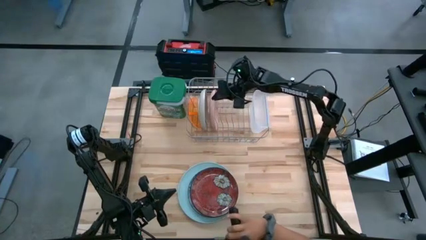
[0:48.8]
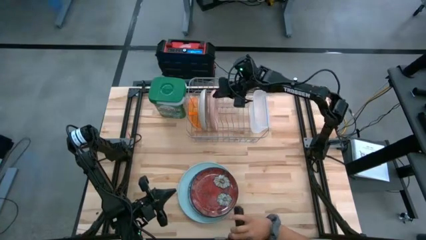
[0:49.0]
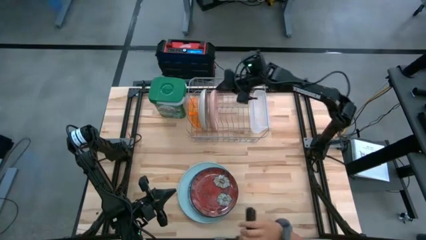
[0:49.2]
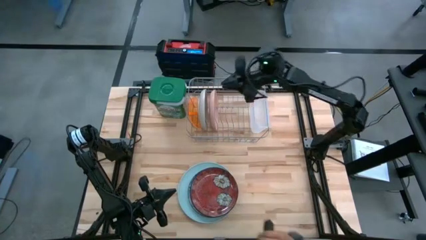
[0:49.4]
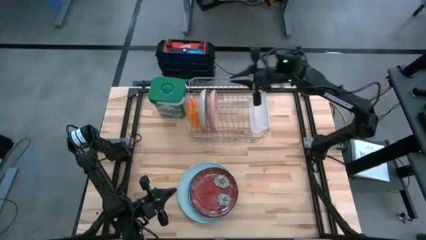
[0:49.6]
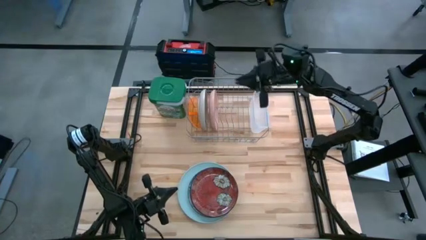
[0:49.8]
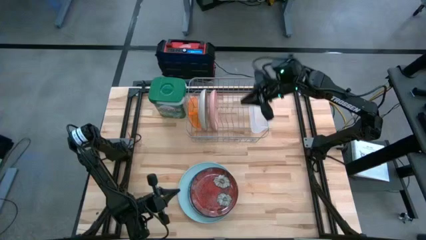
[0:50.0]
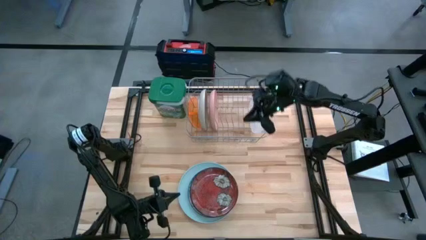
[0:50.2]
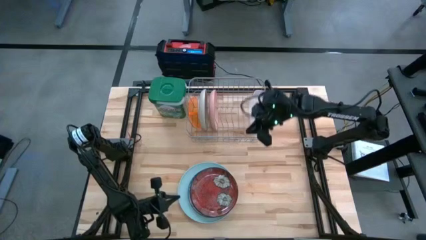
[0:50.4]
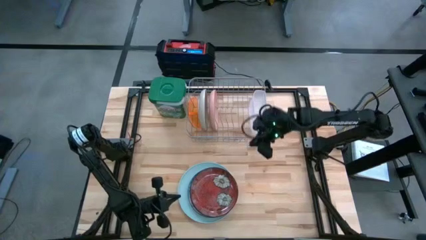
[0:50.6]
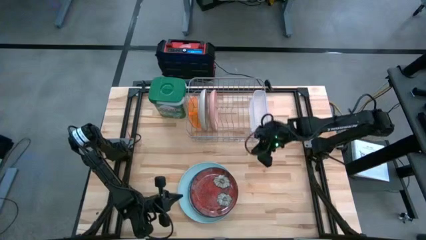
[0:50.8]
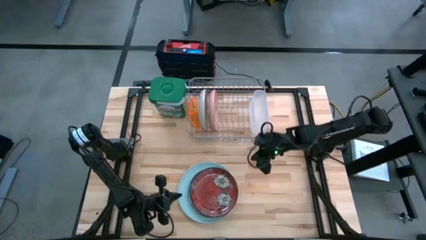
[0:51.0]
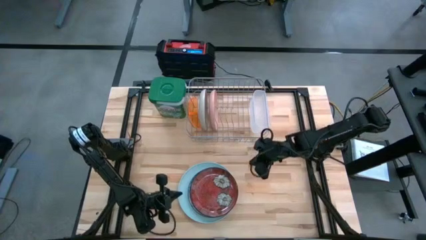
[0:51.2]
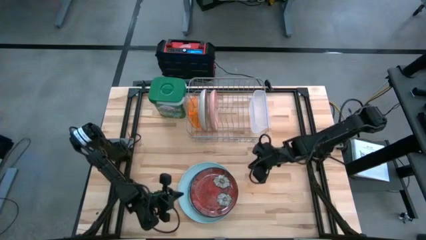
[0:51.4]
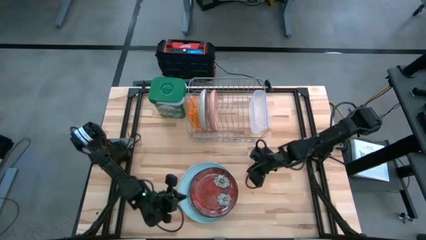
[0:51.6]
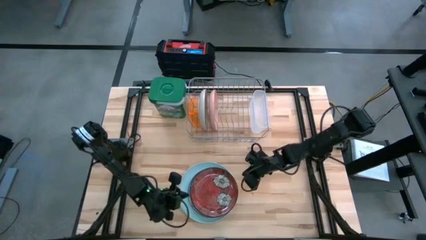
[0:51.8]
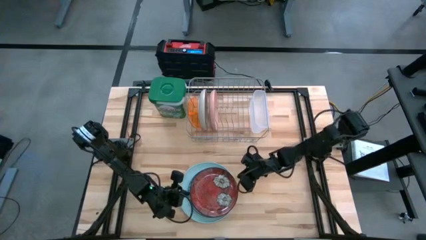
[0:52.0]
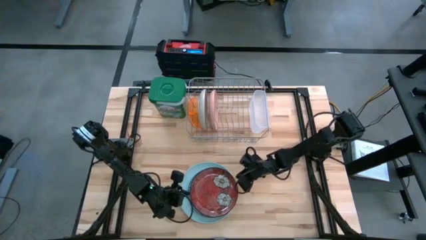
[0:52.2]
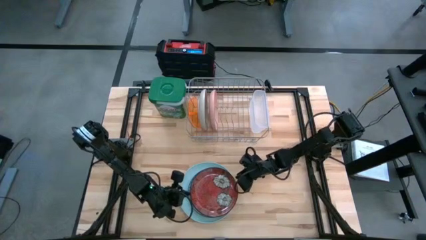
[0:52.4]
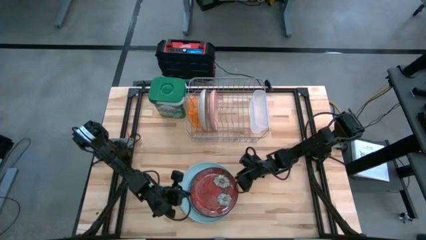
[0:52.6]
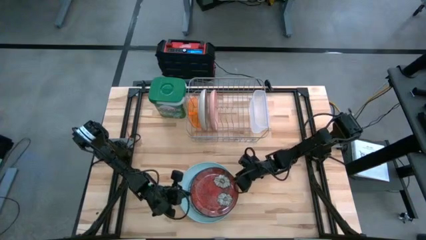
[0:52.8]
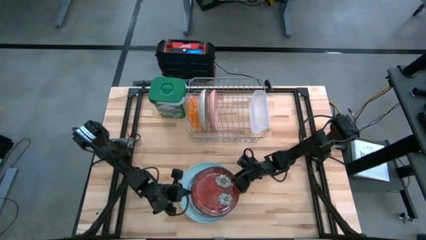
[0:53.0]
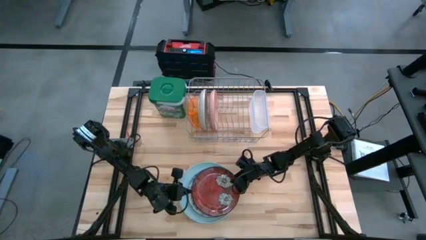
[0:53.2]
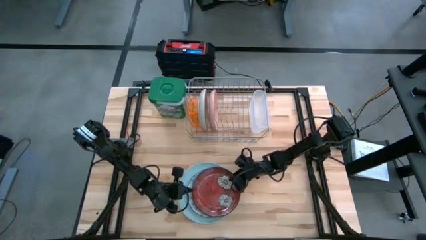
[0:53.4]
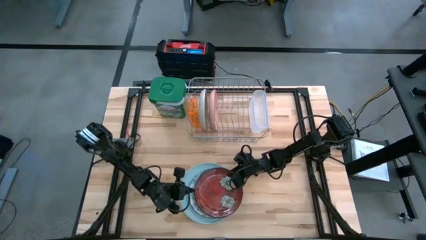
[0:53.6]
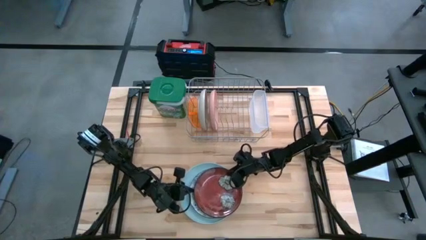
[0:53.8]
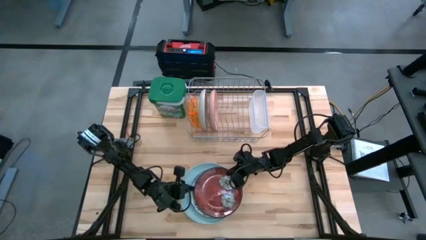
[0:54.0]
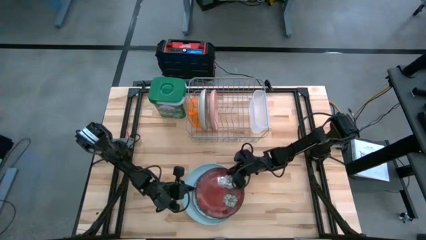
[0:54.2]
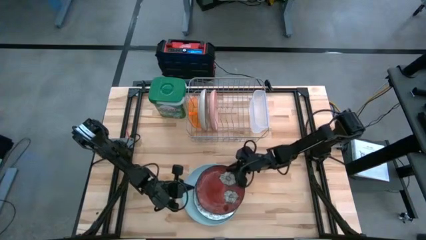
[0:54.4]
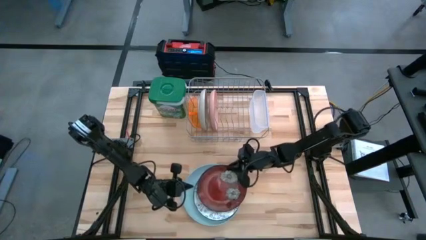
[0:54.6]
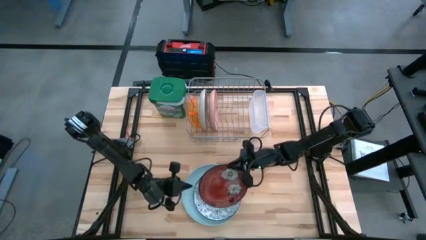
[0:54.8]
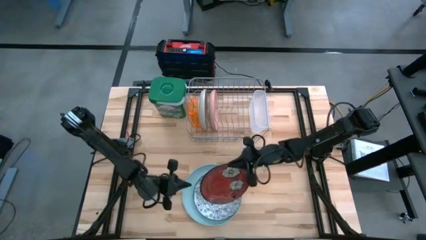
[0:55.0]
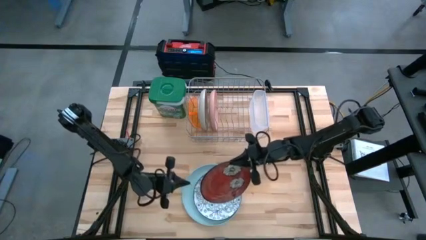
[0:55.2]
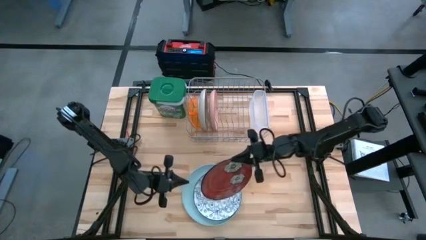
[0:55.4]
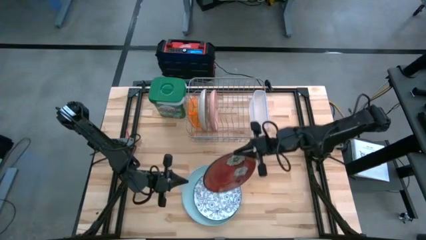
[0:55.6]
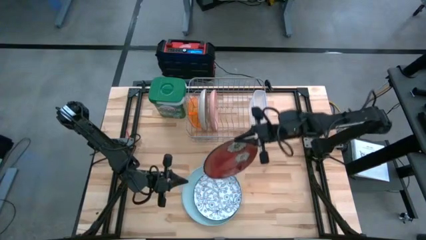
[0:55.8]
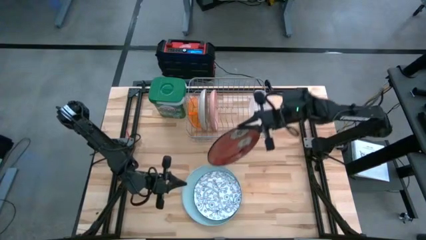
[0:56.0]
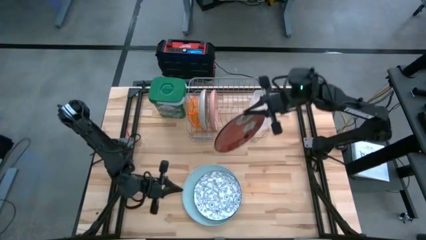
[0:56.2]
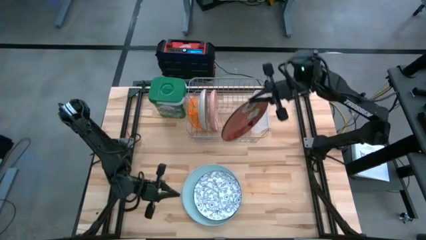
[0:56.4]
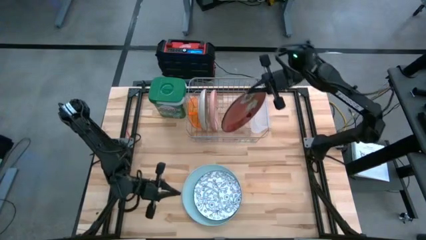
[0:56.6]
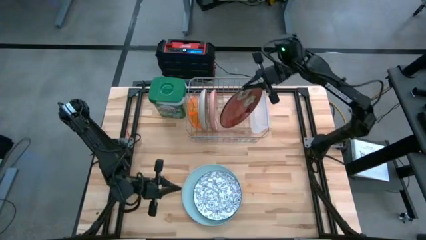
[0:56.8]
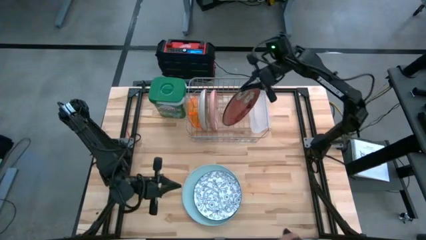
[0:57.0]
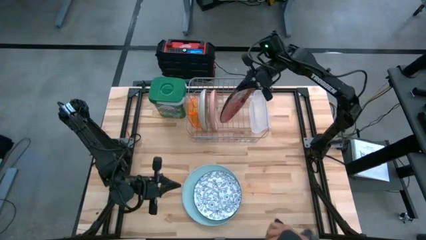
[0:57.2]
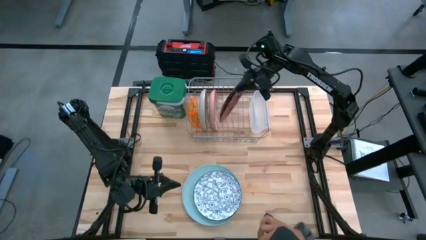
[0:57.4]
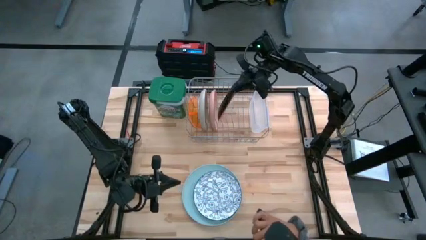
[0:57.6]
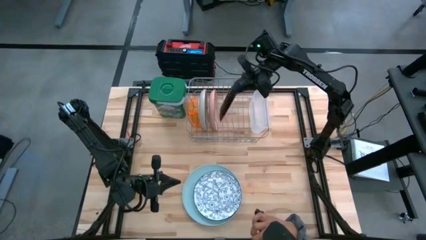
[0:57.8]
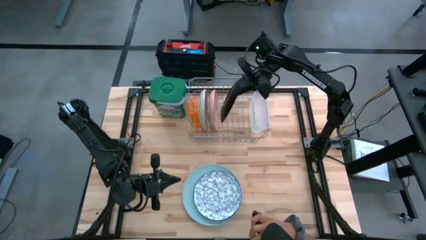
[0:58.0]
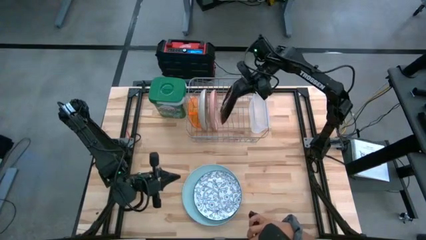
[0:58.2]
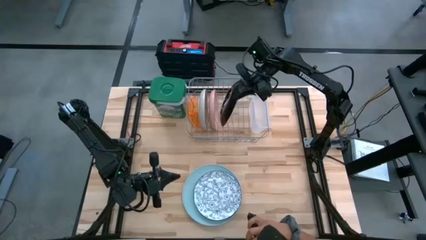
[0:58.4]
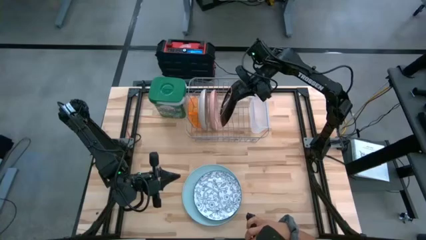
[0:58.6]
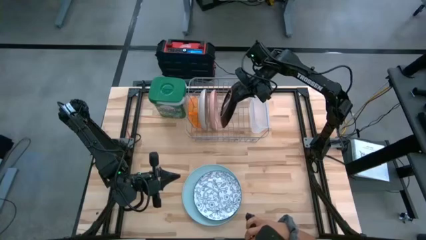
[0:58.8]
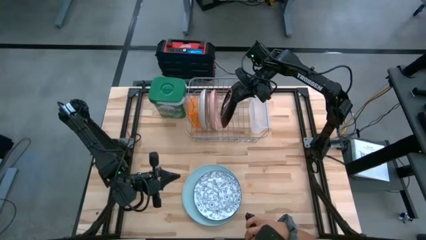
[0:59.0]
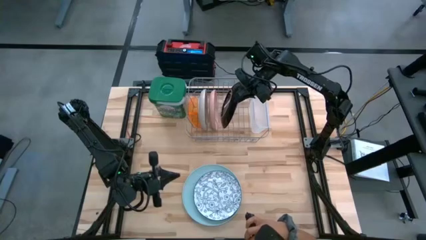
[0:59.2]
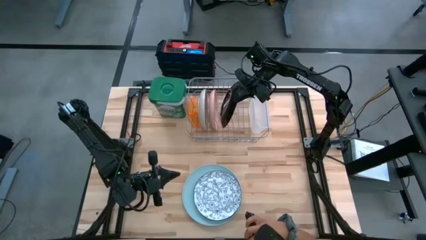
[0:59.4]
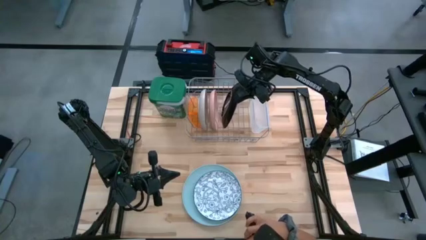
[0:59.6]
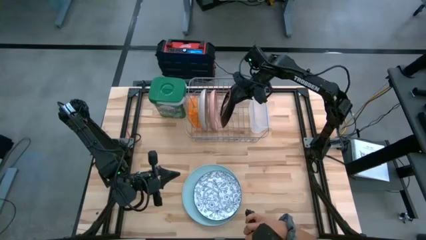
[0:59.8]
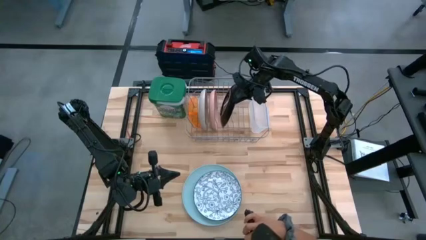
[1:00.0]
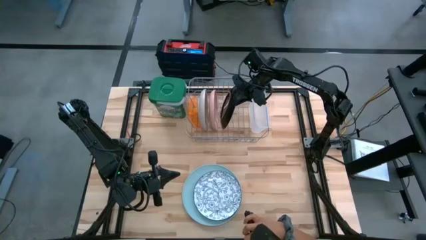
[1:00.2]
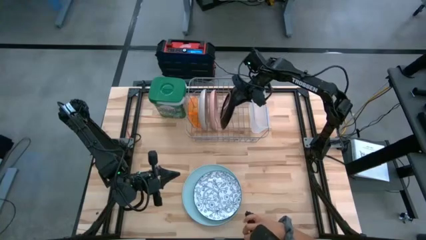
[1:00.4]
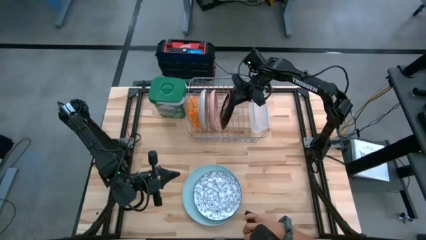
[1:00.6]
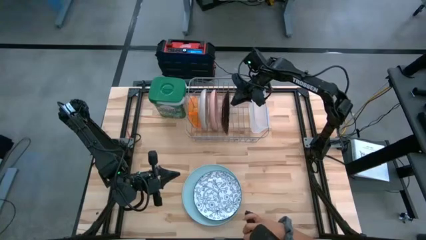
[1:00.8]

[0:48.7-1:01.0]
Task: Sort dishes
Put the red plate in the dishwasher rack
